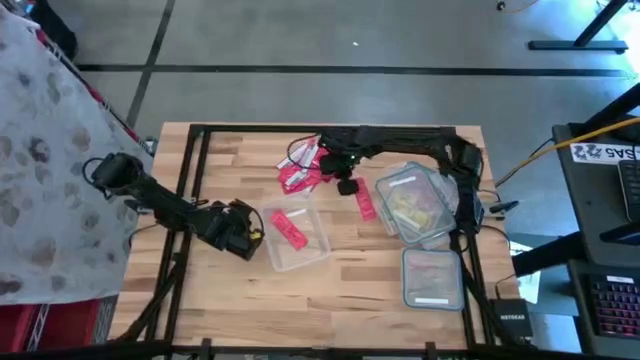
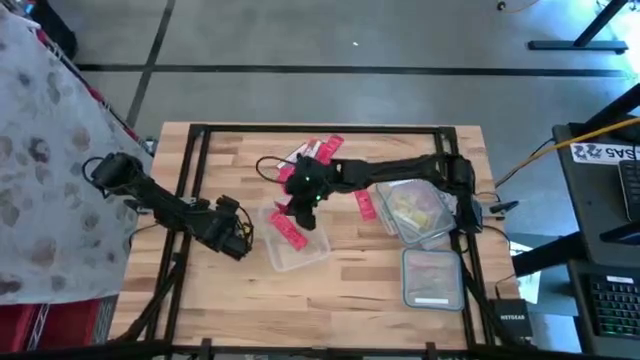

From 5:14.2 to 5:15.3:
Task: Sort candy
Put the pink candy strip into the left transparent bin

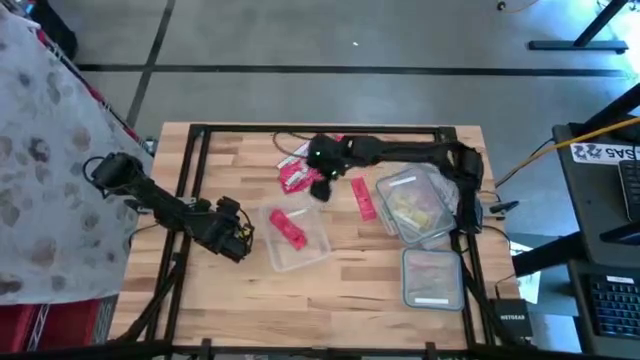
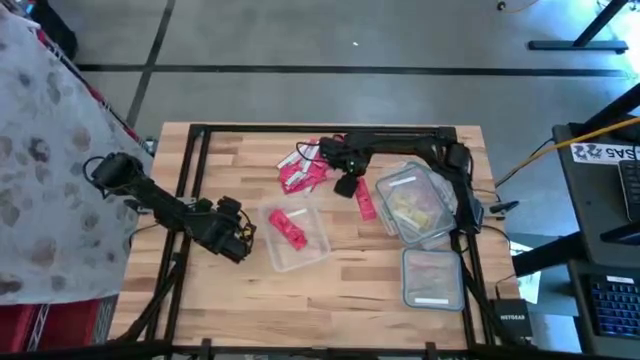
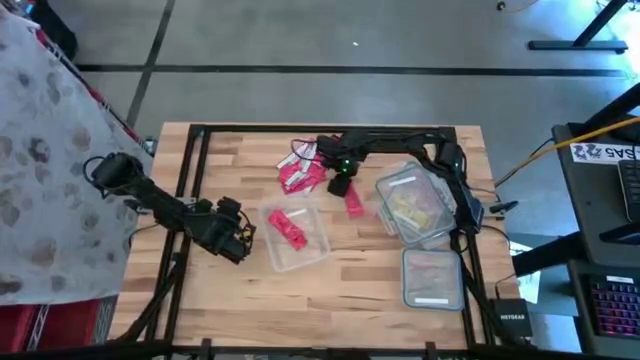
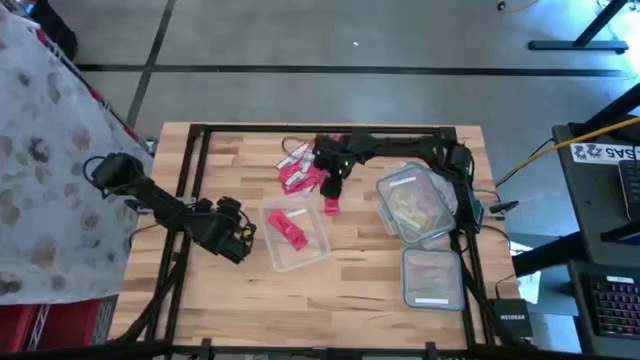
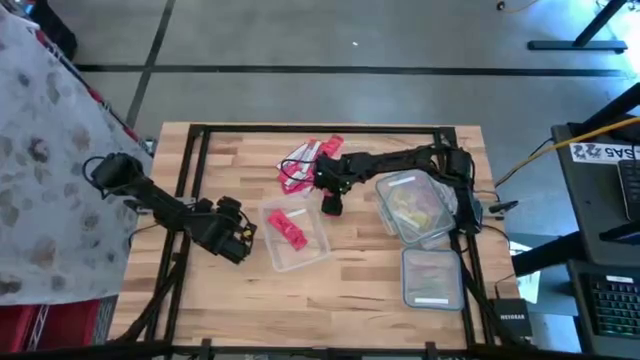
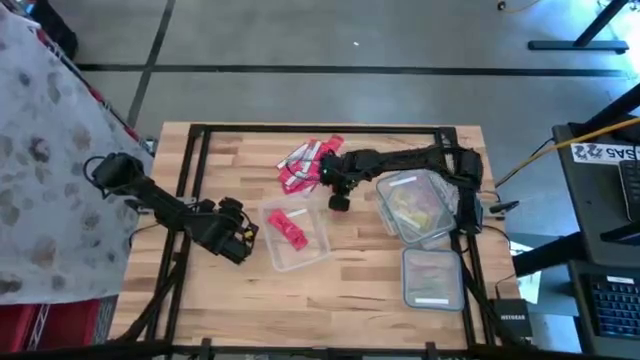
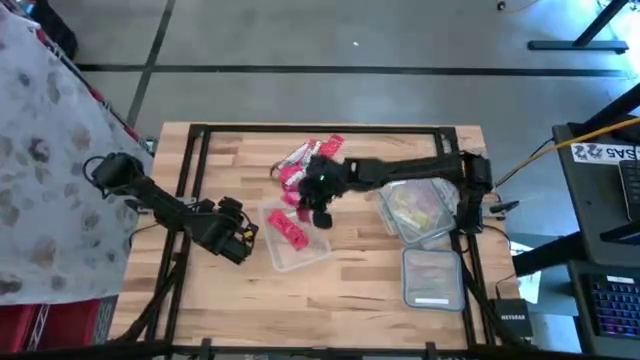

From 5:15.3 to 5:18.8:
Put the pink candy strip into the left transparent bin

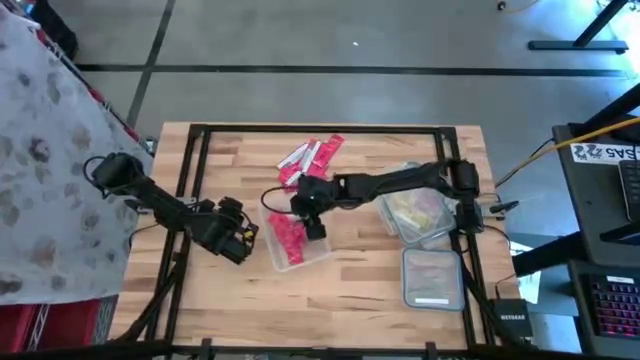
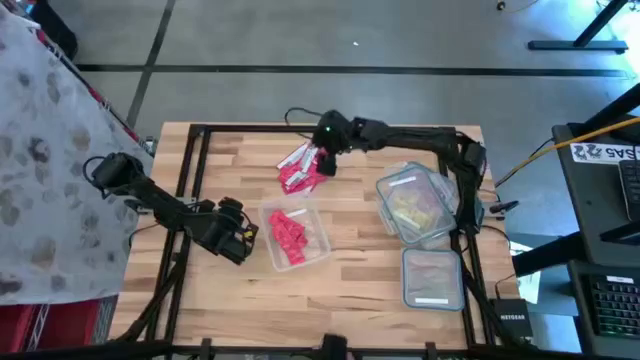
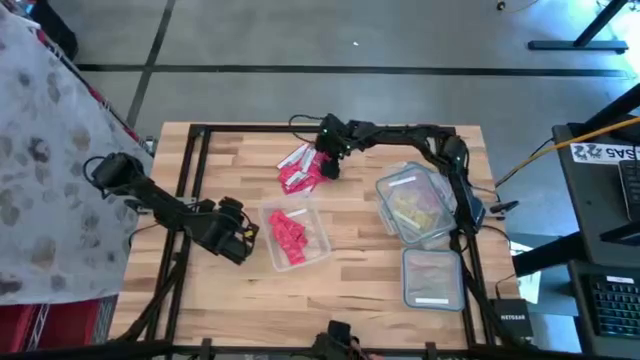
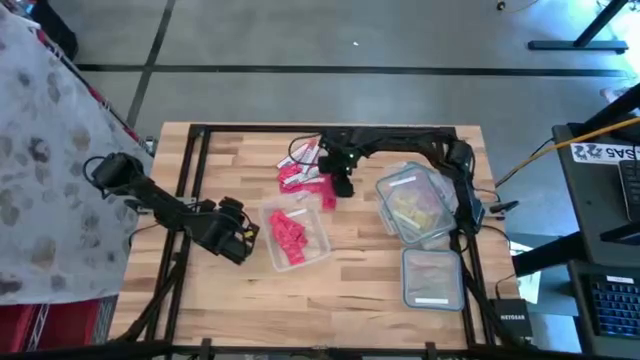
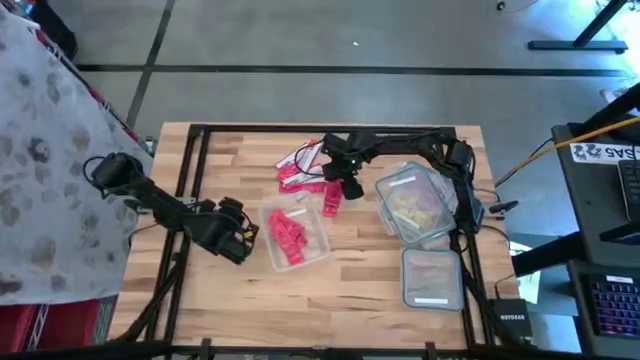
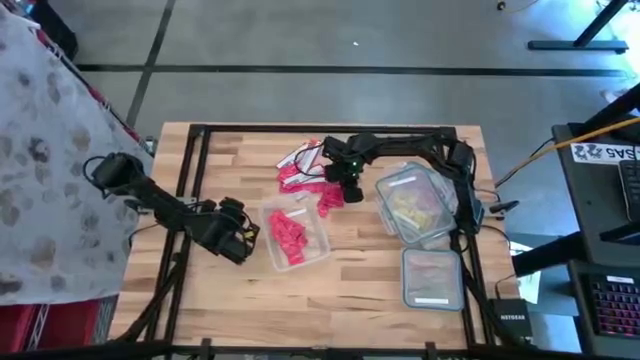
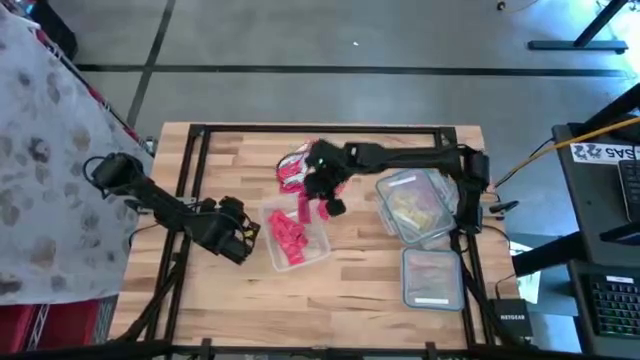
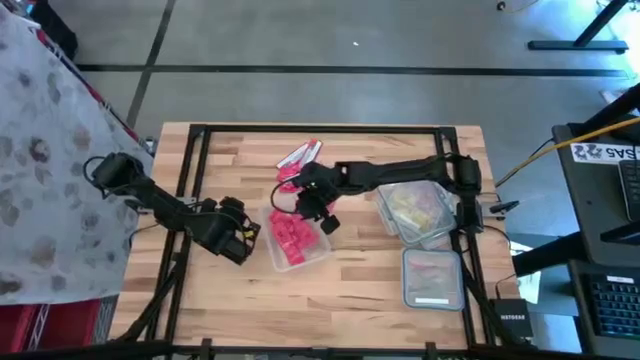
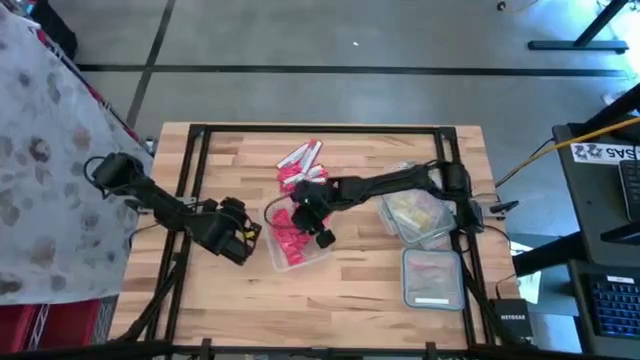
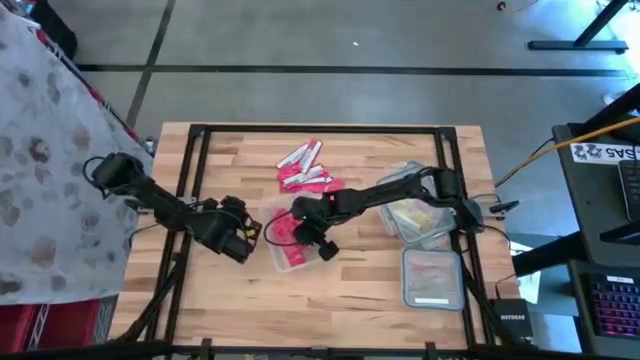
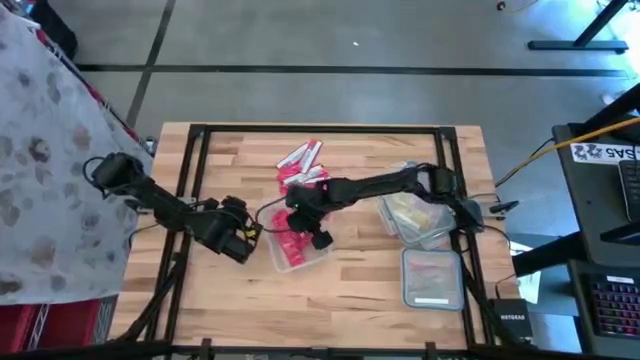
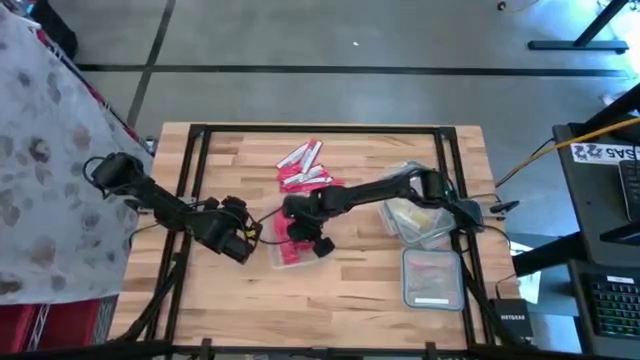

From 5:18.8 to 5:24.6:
Put the pink candy strip into the left transparent bin

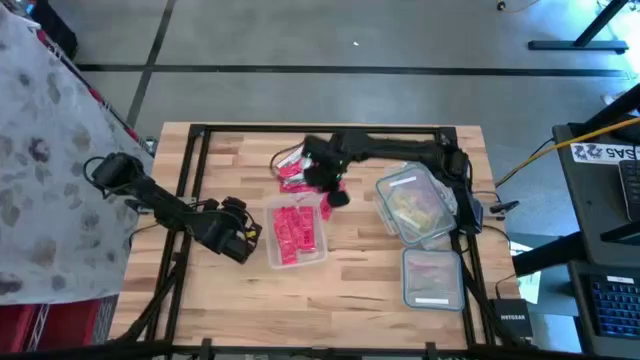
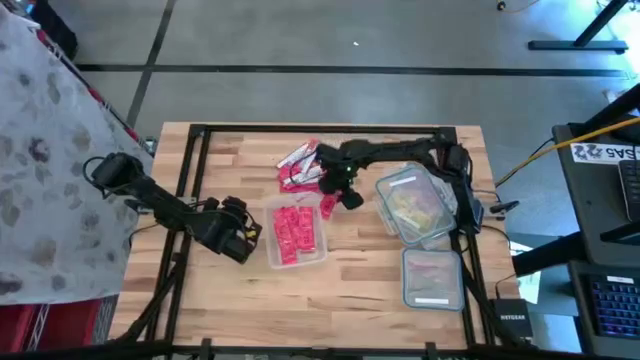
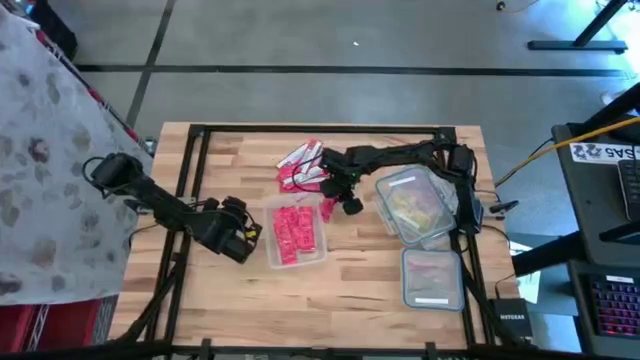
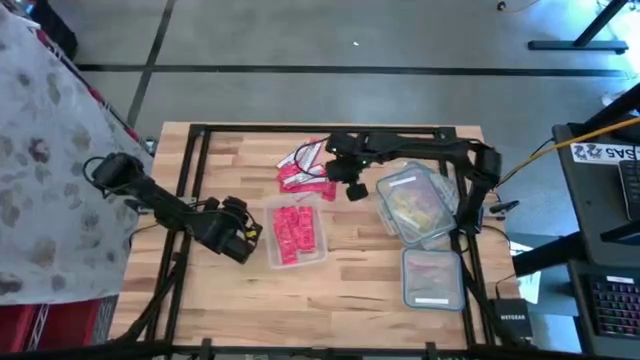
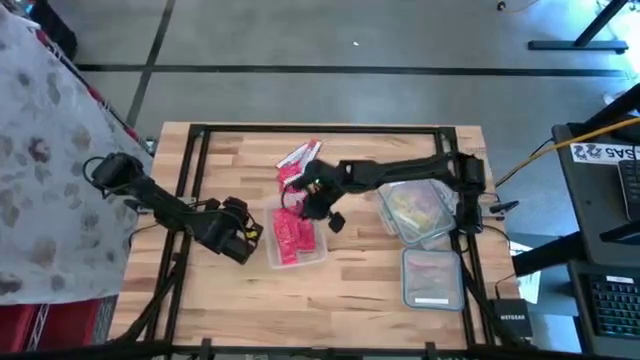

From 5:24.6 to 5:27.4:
Put the pink candy strip into the left transparent bin

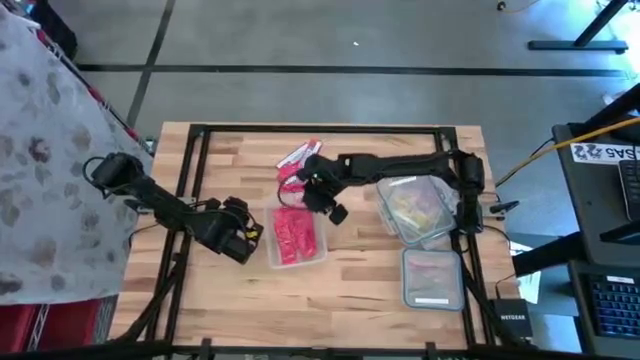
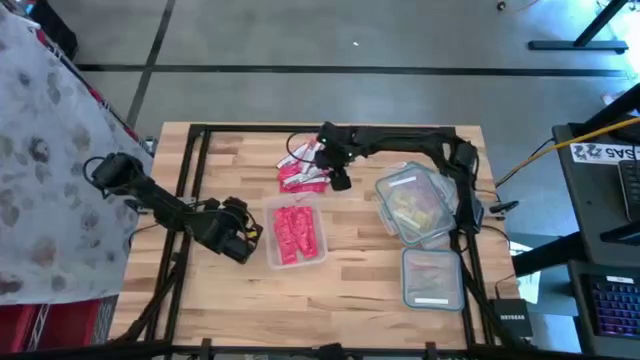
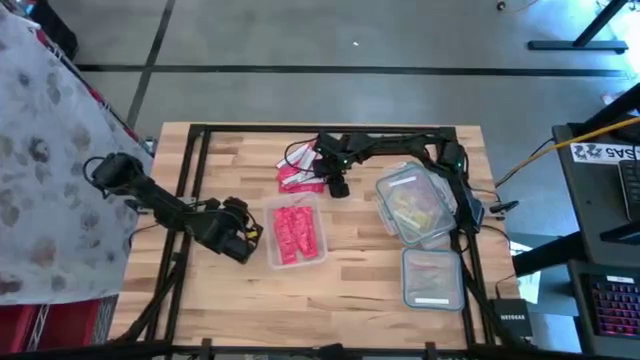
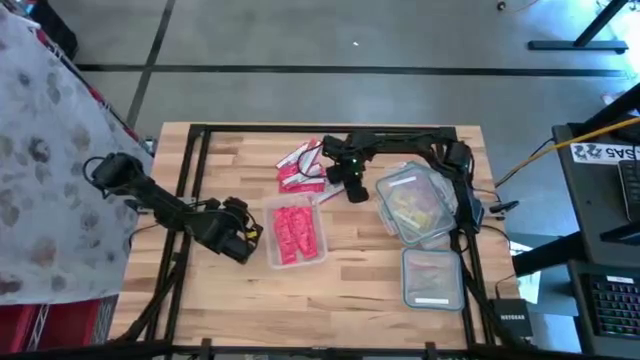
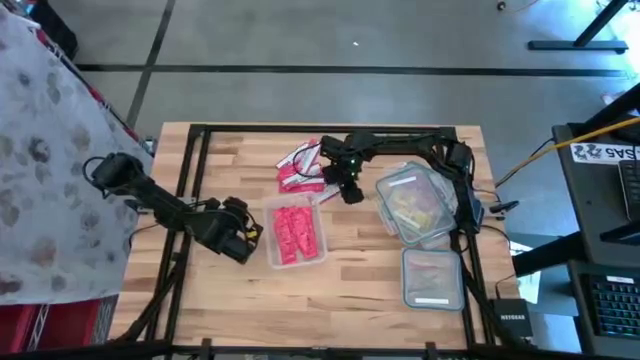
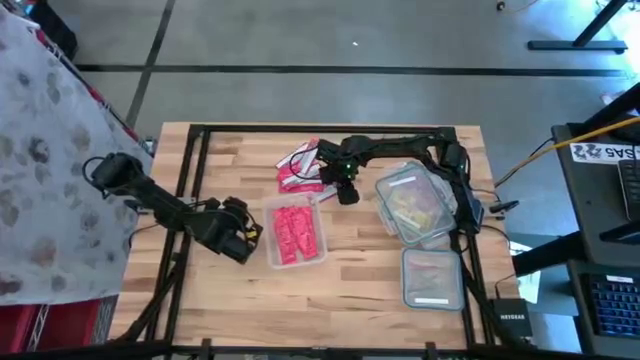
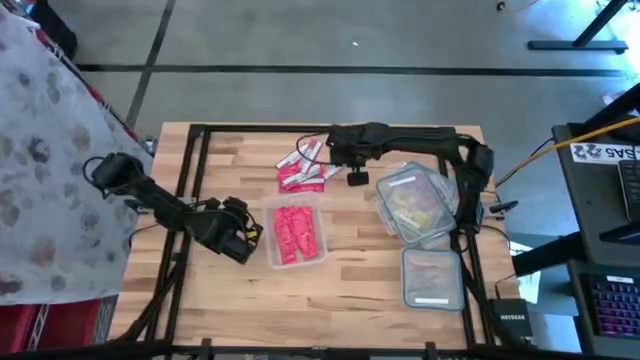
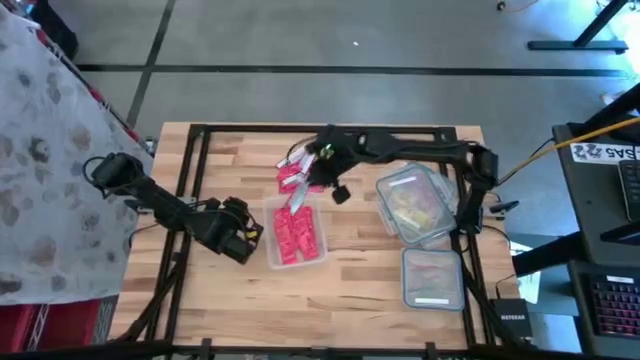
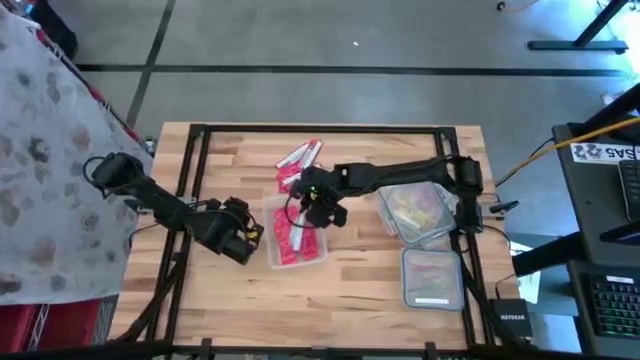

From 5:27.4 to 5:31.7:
Put the pink candy strip into the left transparent bin

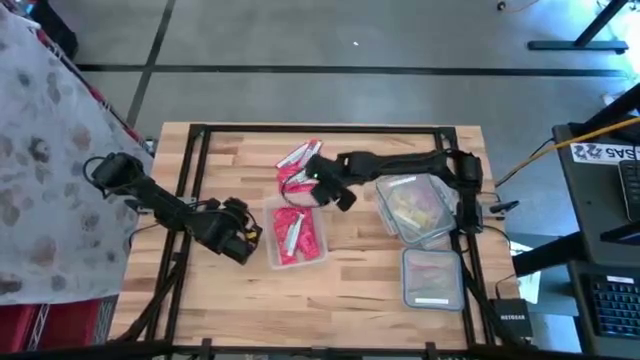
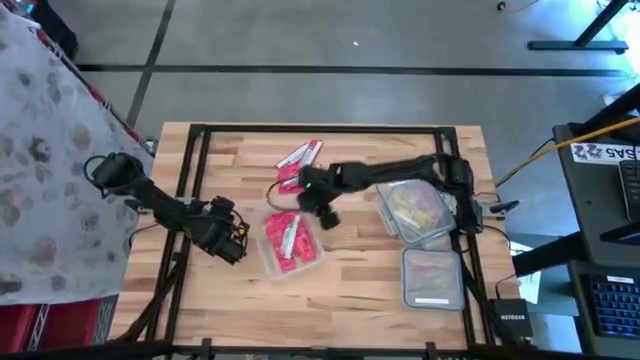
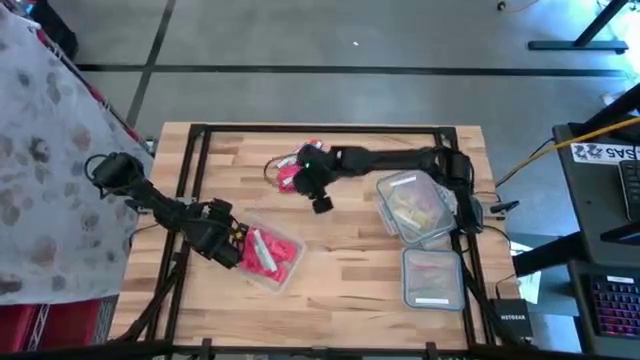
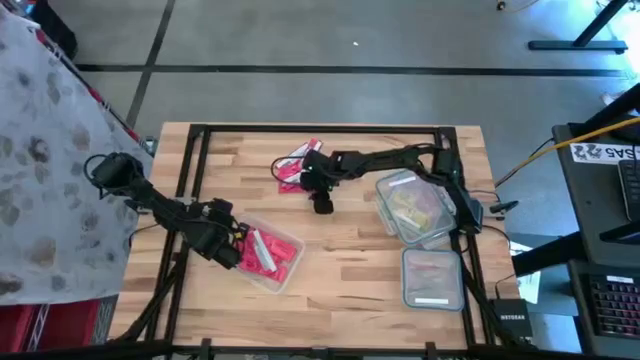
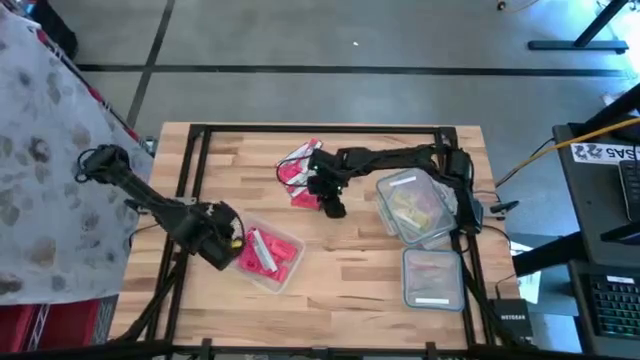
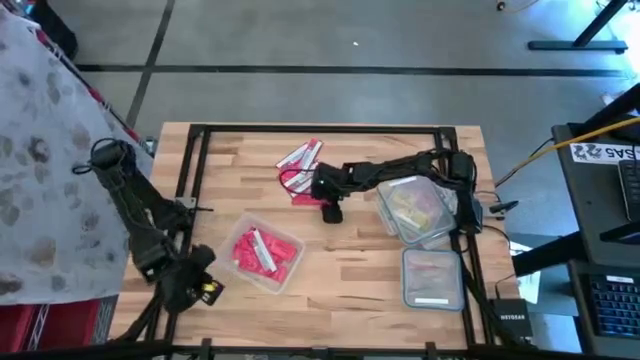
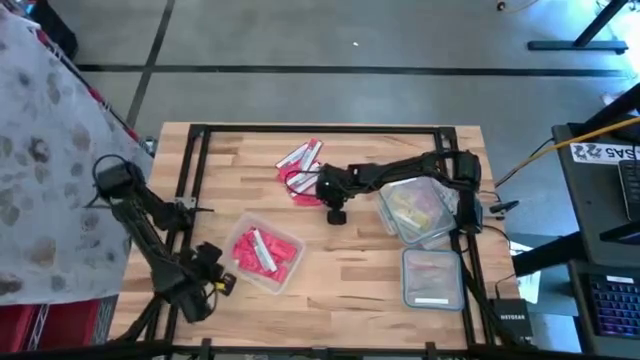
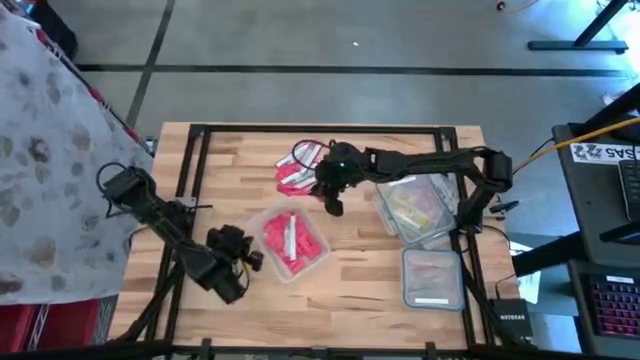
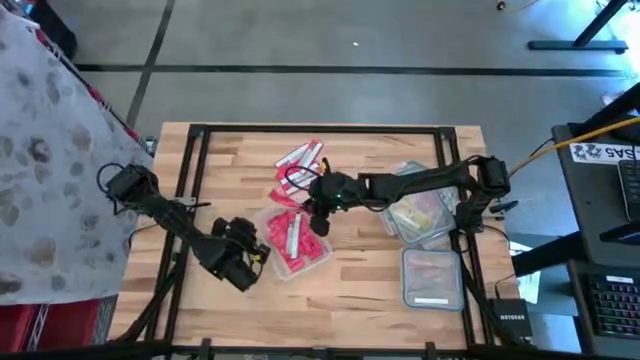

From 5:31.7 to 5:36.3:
Put the pink candy strip into the left transparent bin
